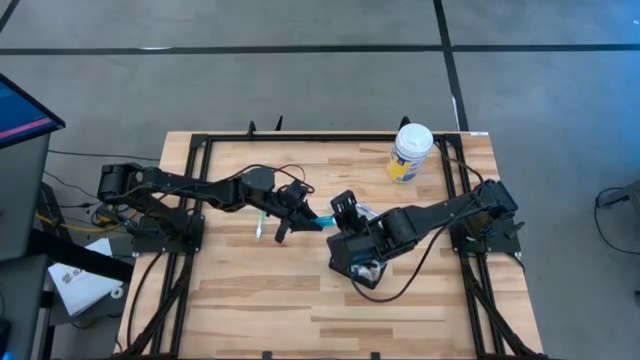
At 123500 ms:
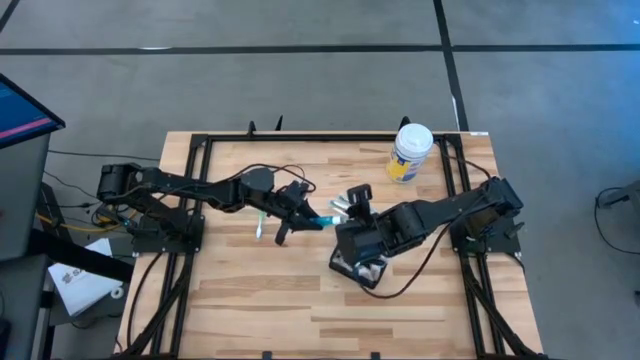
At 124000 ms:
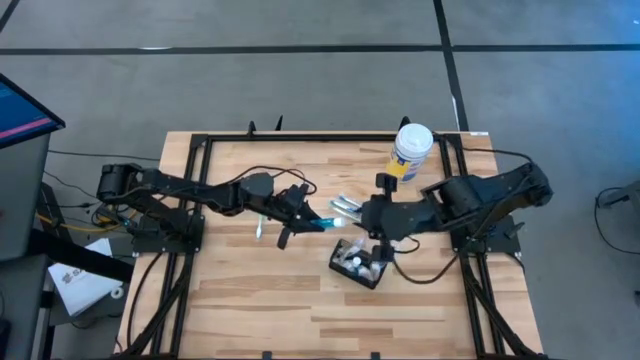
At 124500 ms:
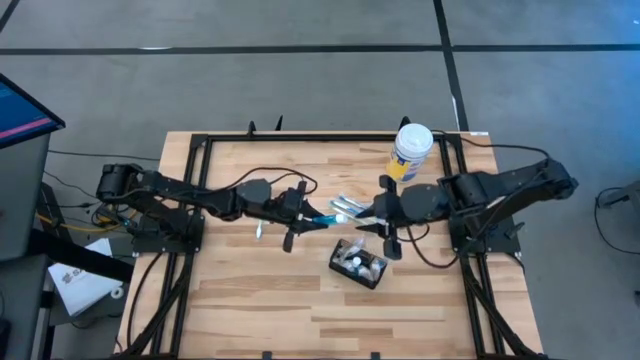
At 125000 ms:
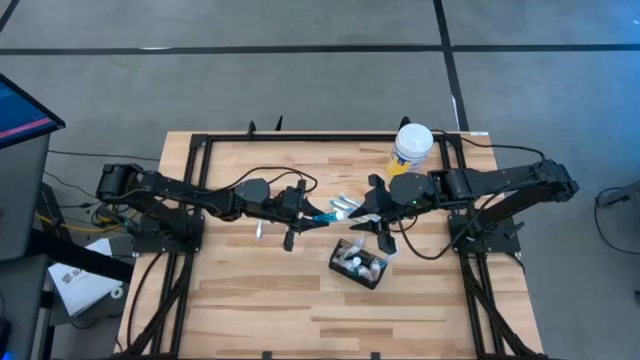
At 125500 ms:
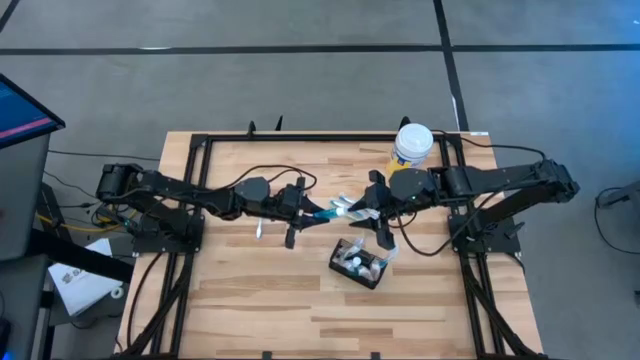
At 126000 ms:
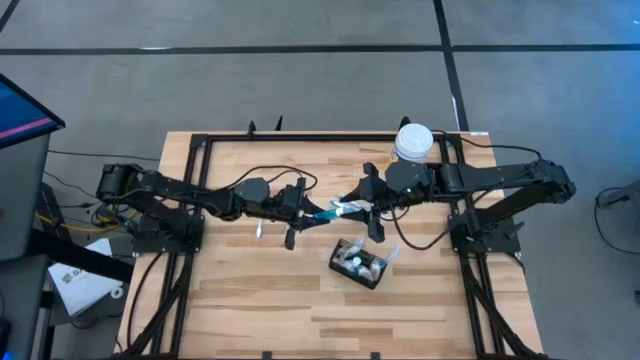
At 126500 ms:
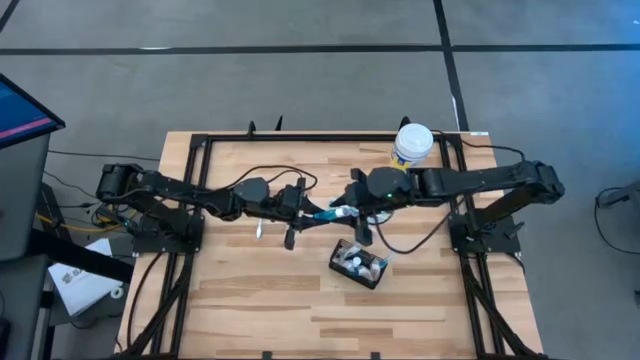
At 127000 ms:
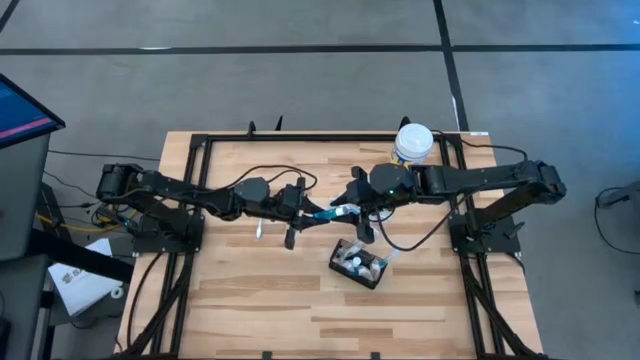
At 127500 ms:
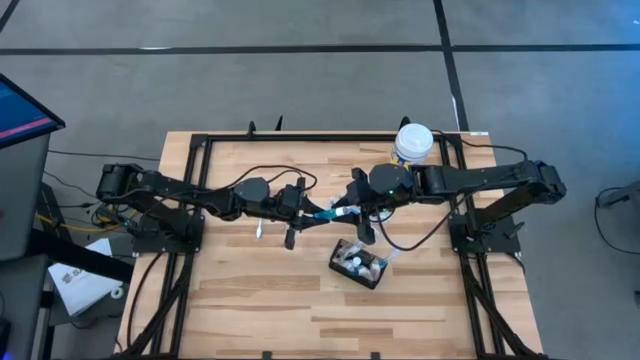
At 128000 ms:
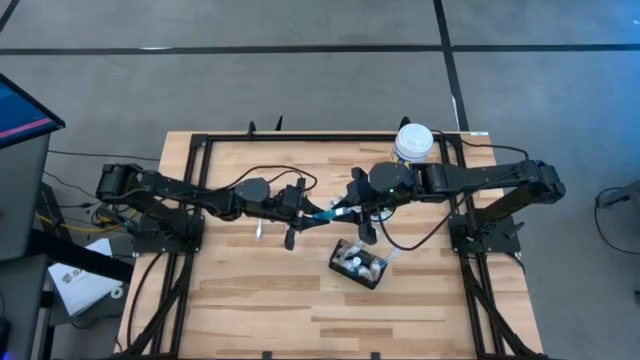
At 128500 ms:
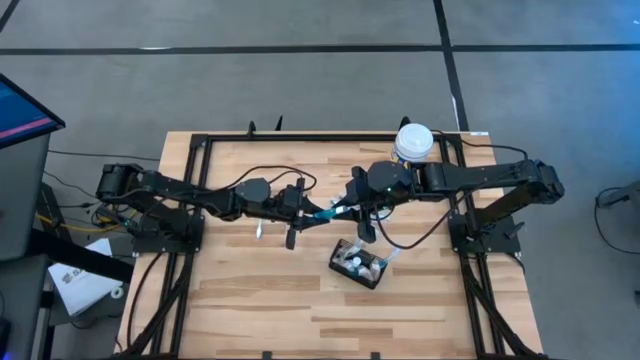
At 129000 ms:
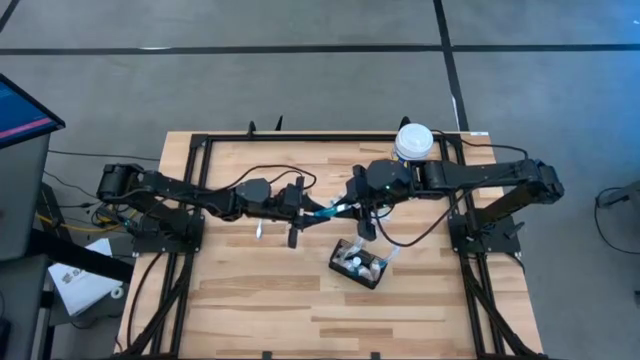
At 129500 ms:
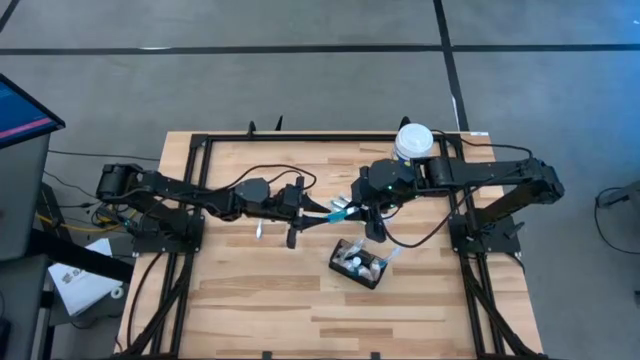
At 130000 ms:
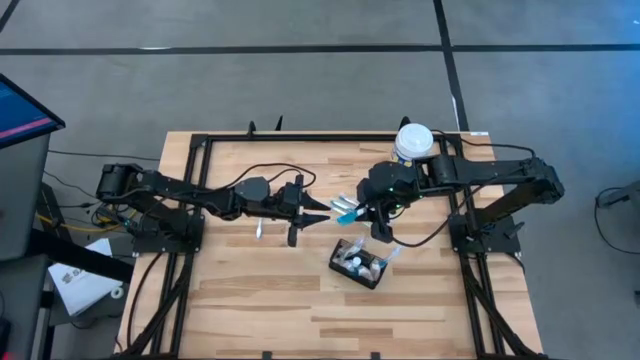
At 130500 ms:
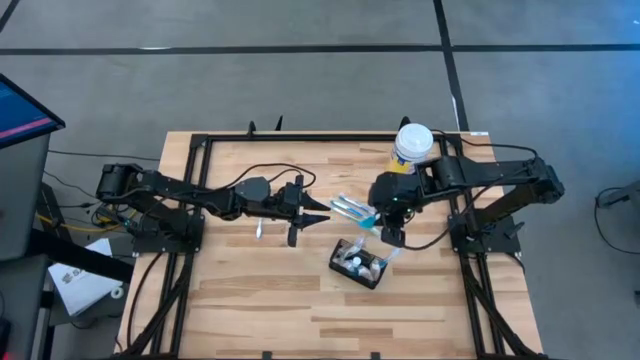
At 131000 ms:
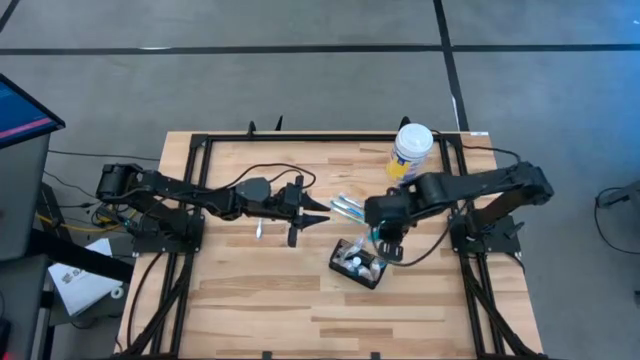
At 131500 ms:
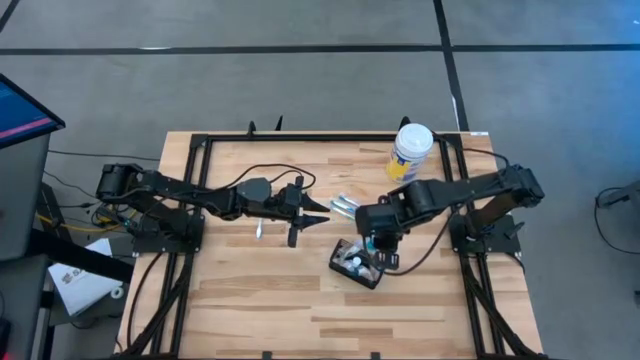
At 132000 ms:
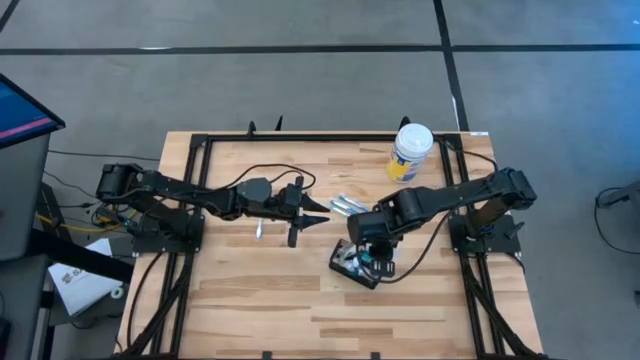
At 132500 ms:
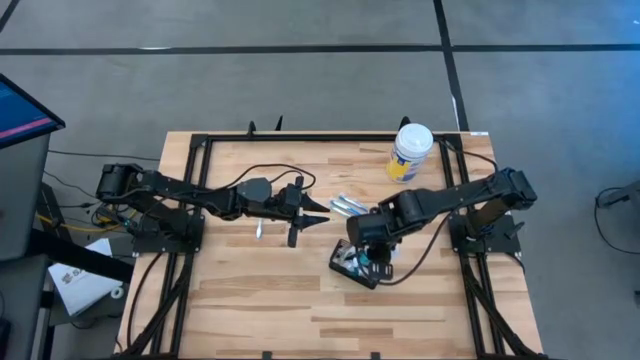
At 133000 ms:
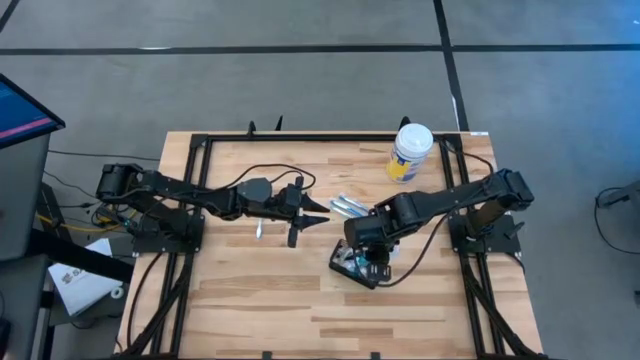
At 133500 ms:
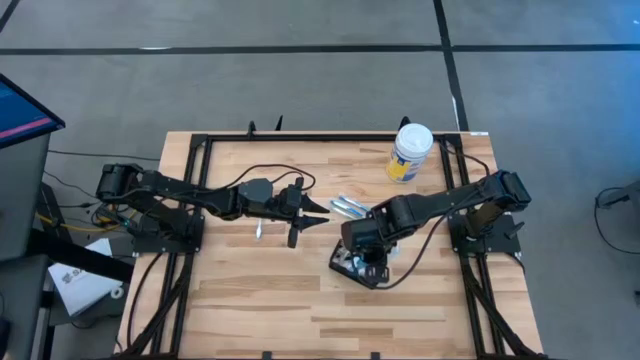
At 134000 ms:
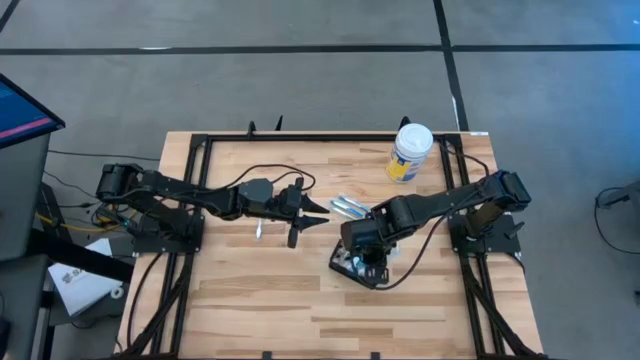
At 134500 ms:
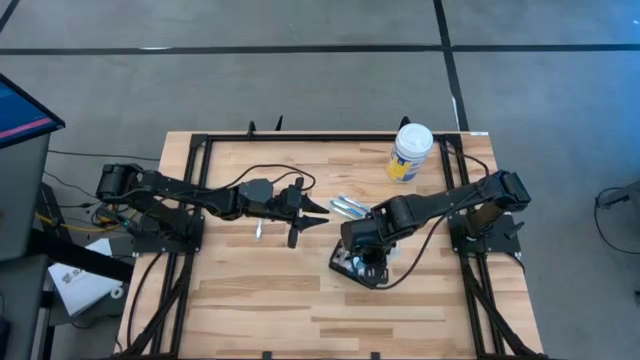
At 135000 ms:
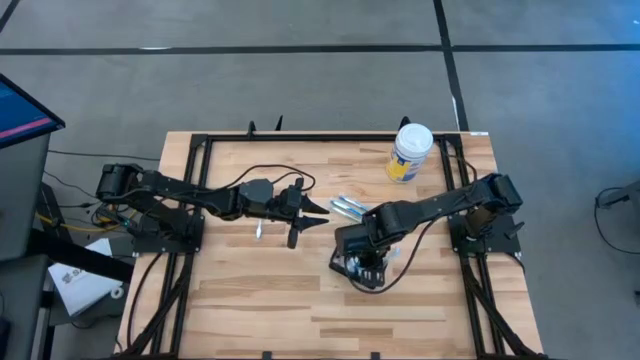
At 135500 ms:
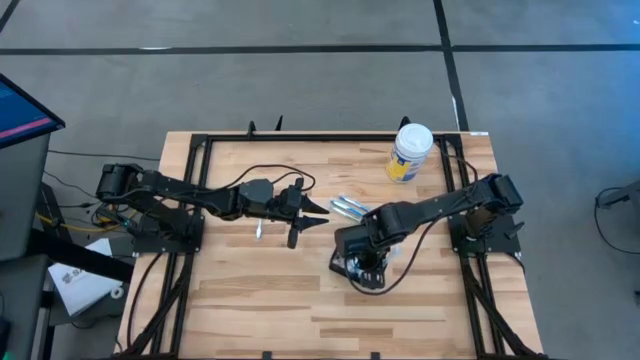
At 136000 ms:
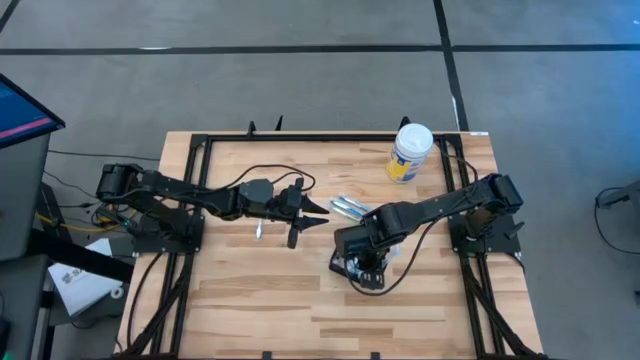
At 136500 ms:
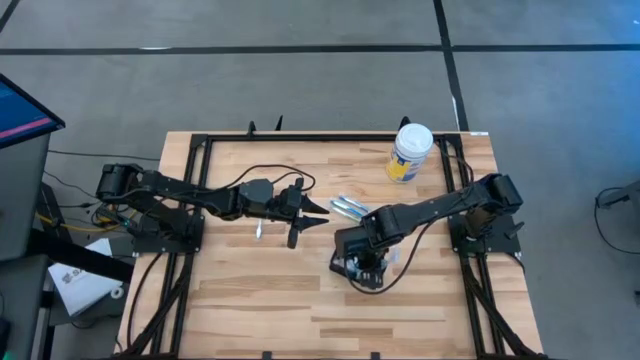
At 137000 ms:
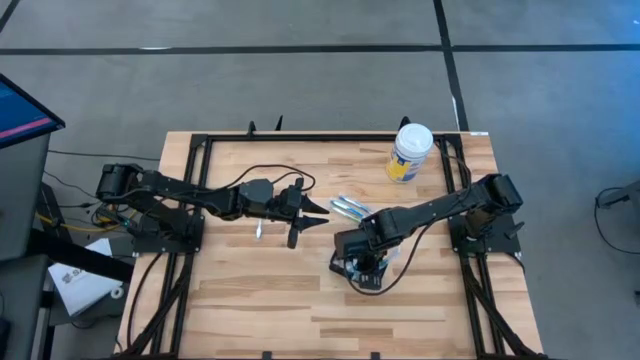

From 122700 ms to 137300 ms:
Task: Pick & Place toothbrushing station
Put the blue mouthwash into the mesh organizer

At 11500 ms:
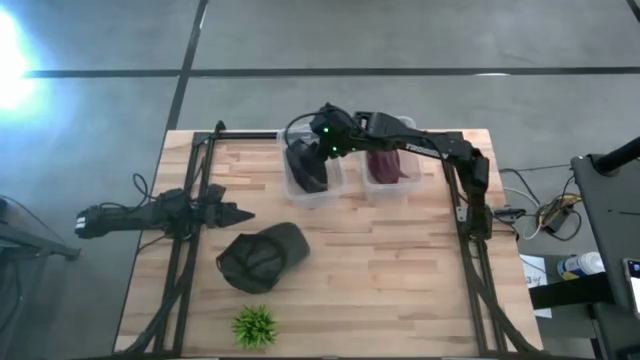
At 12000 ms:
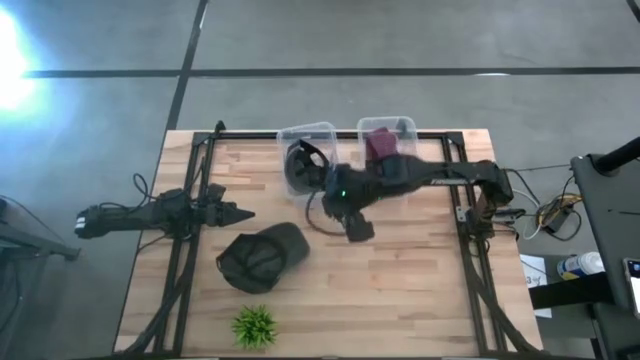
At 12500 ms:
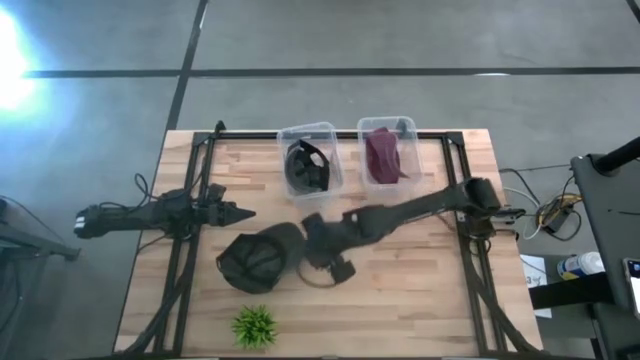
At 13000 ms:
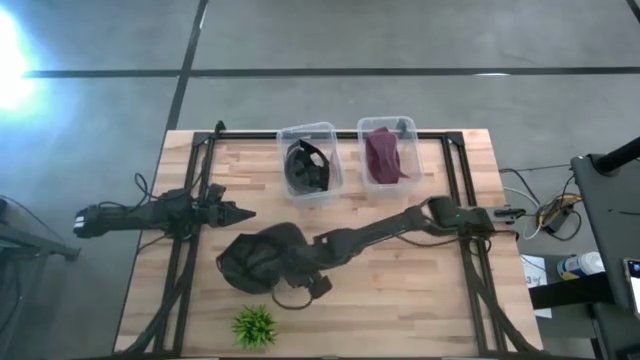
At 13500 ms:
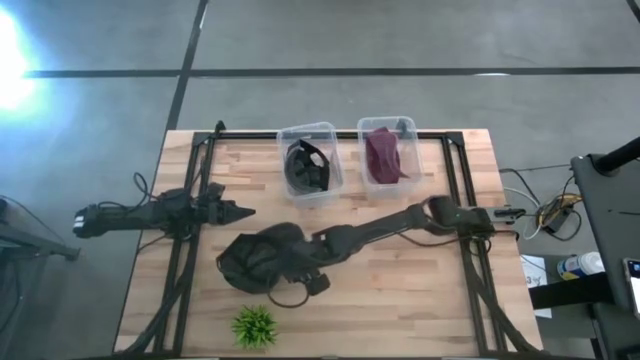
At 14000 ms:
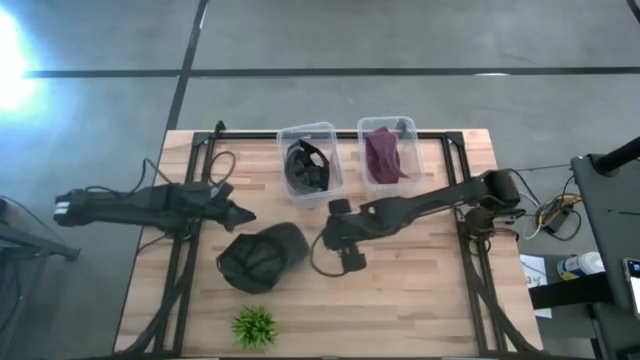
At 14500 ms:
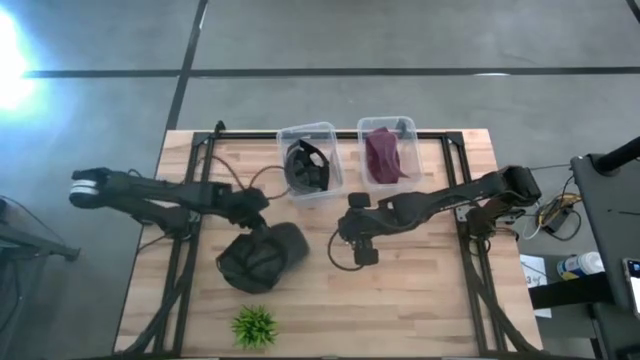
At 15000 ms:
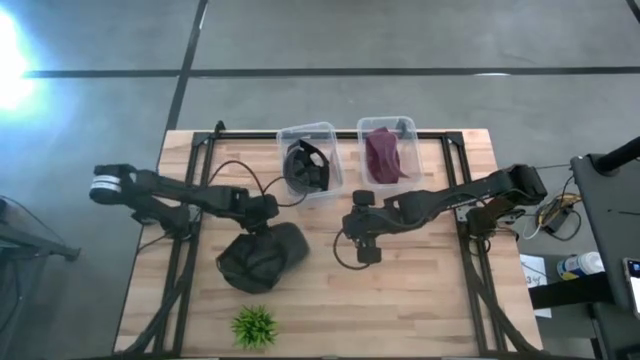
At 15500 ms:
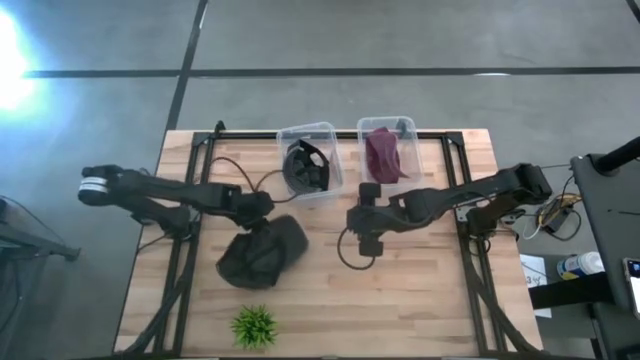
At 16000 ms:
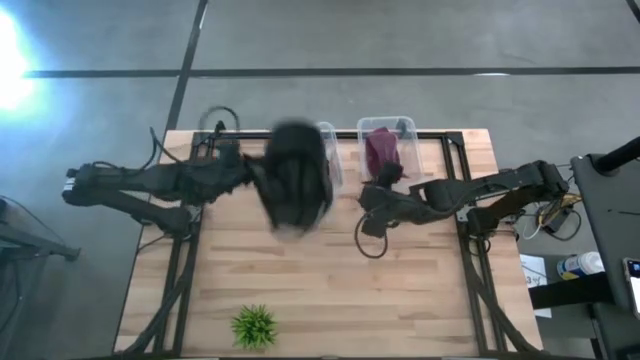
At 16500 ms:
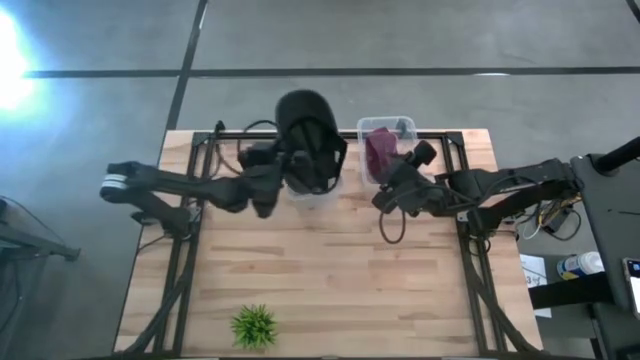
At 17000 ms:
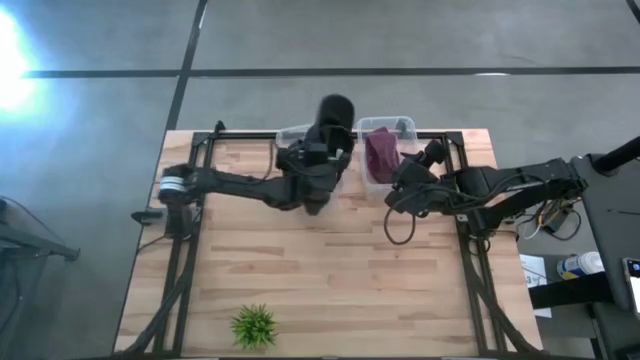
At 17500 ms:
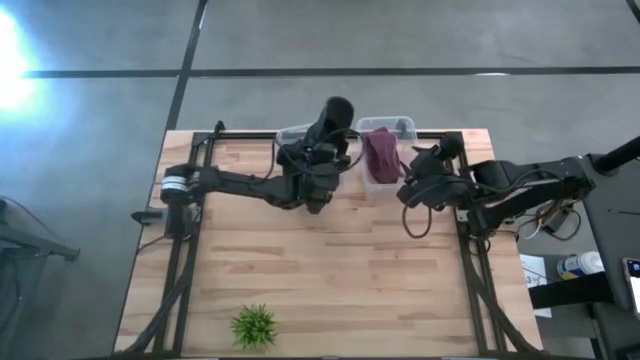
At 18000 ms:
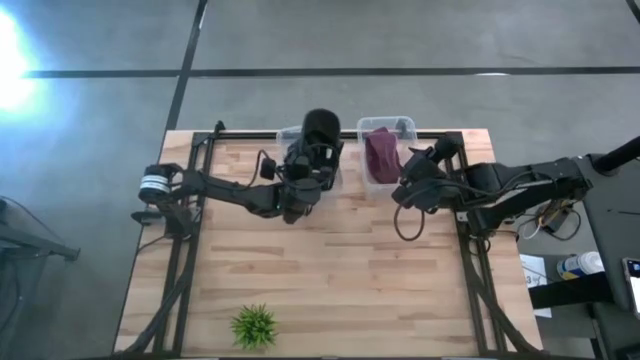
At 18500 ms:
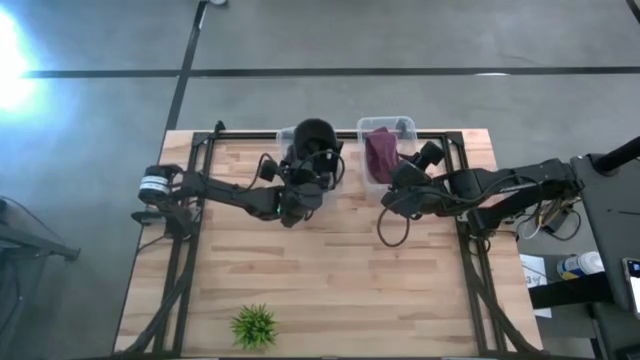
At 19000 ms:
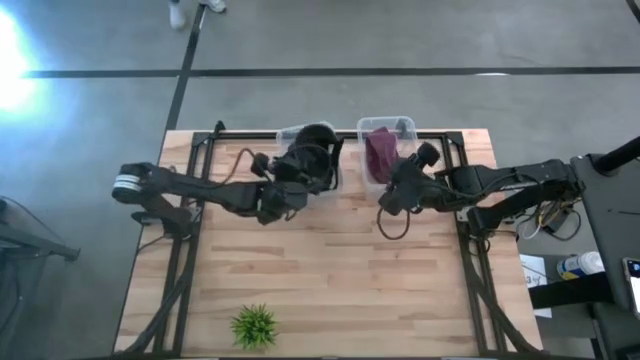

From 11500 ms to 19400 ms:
Task: Pick & Place hat
Put the black cap into the left transparent bin
